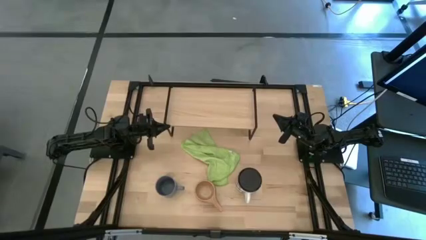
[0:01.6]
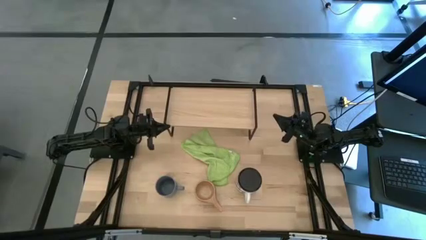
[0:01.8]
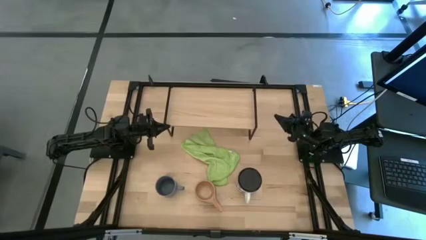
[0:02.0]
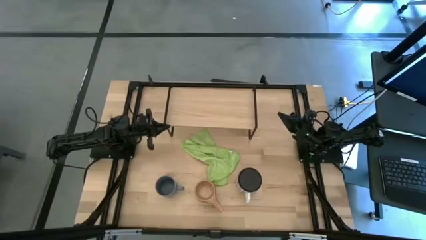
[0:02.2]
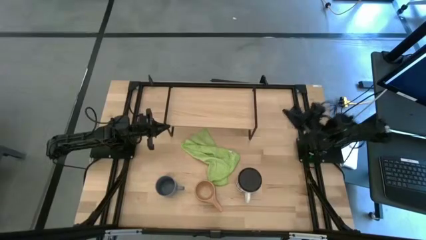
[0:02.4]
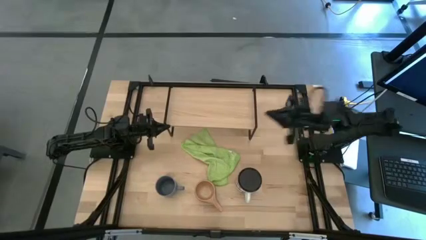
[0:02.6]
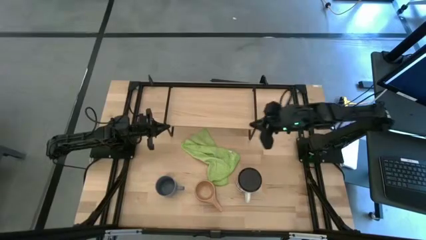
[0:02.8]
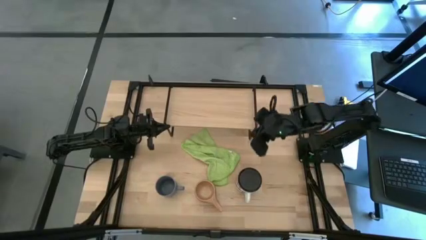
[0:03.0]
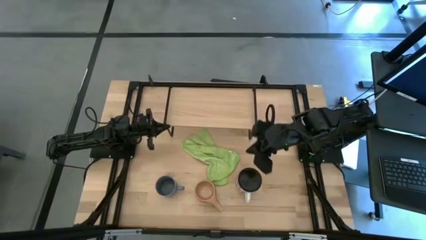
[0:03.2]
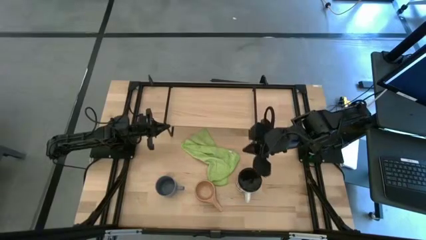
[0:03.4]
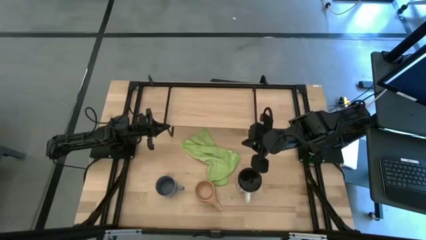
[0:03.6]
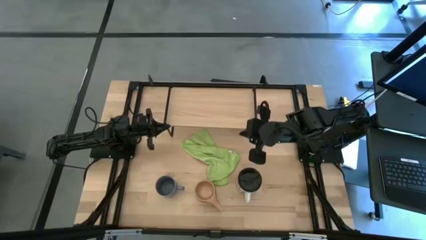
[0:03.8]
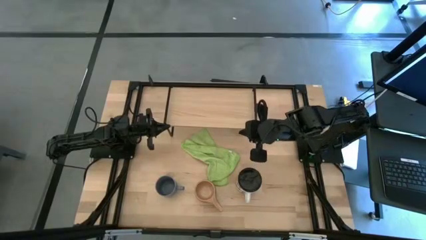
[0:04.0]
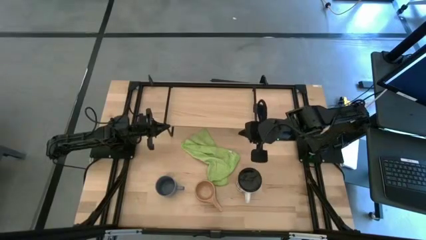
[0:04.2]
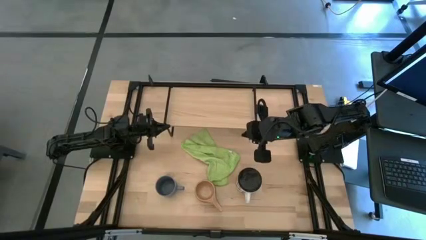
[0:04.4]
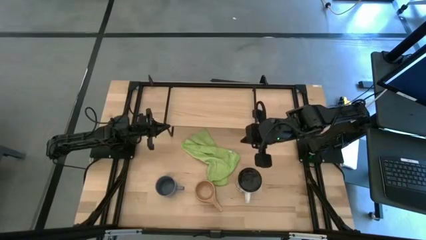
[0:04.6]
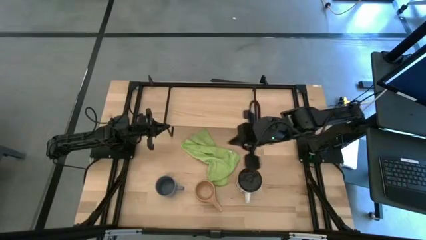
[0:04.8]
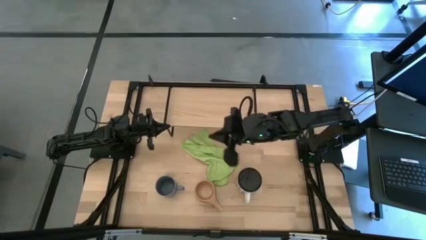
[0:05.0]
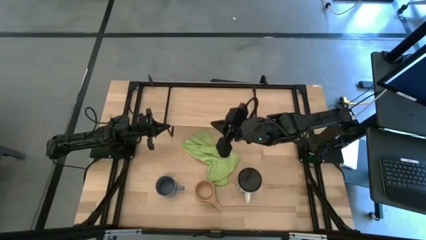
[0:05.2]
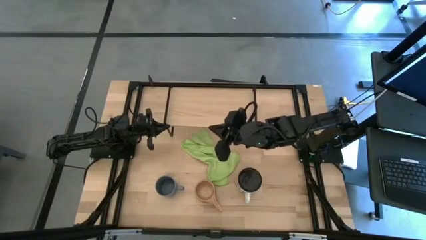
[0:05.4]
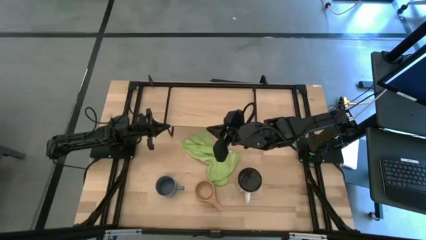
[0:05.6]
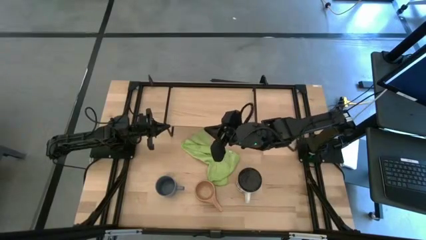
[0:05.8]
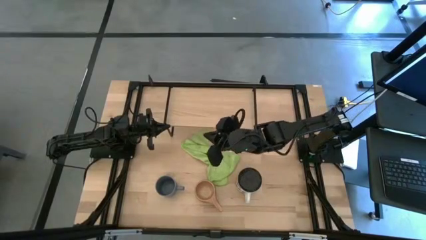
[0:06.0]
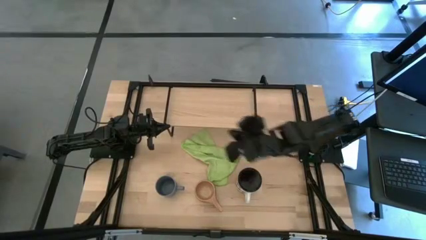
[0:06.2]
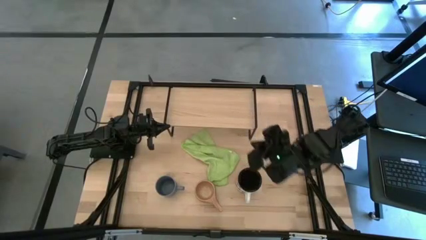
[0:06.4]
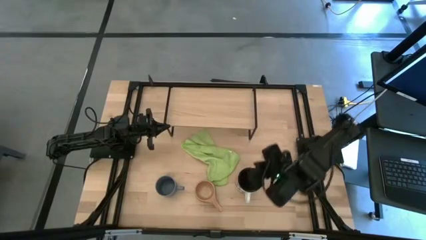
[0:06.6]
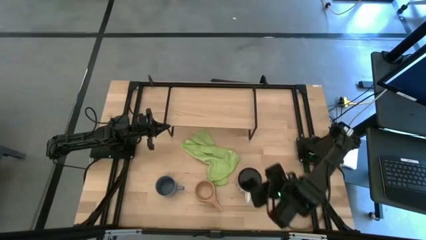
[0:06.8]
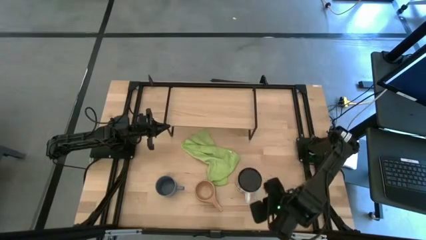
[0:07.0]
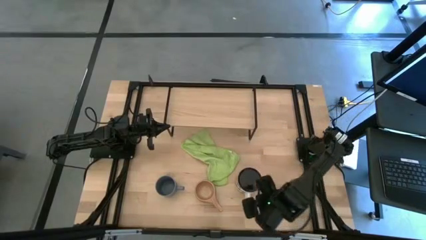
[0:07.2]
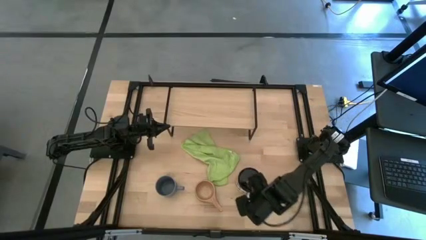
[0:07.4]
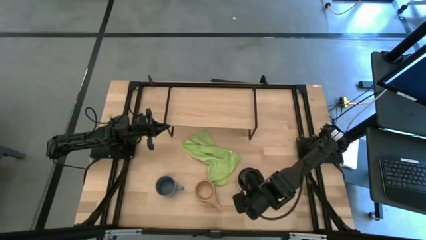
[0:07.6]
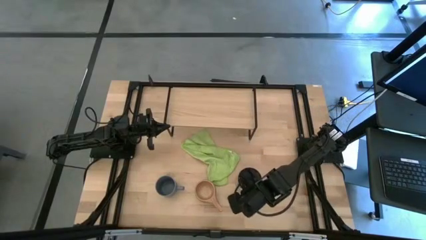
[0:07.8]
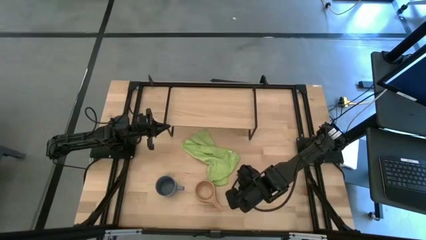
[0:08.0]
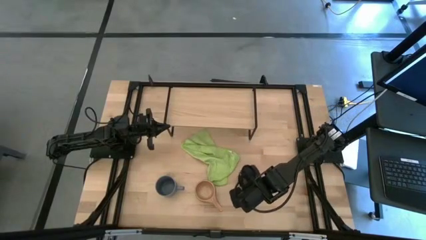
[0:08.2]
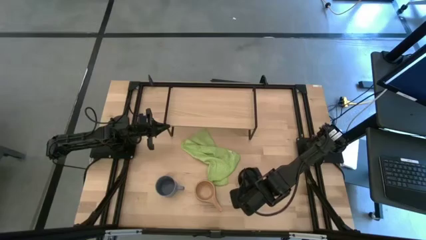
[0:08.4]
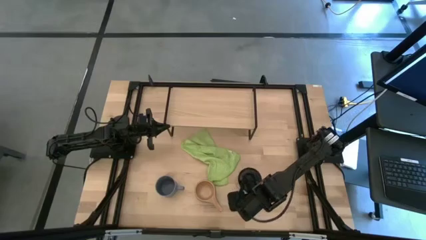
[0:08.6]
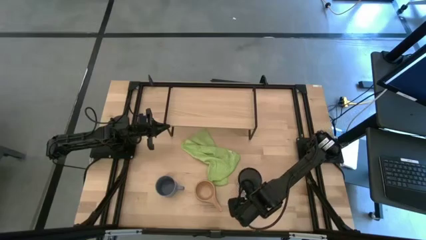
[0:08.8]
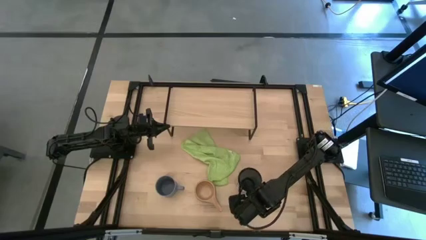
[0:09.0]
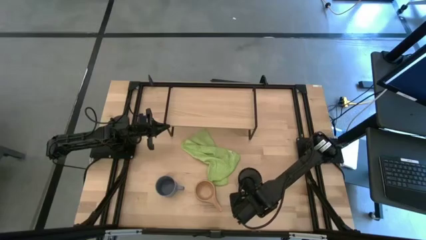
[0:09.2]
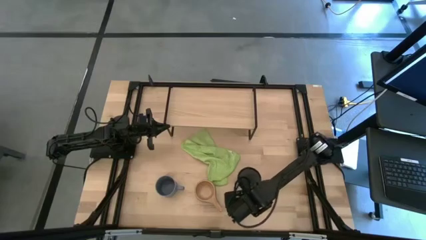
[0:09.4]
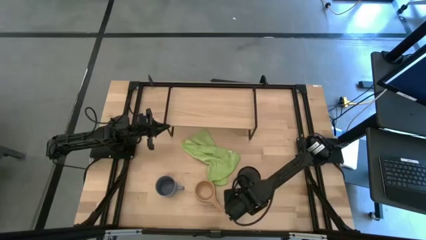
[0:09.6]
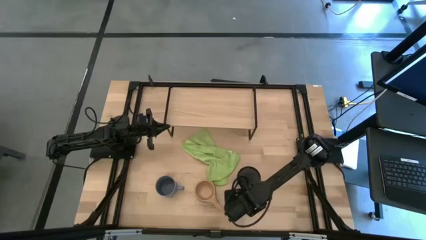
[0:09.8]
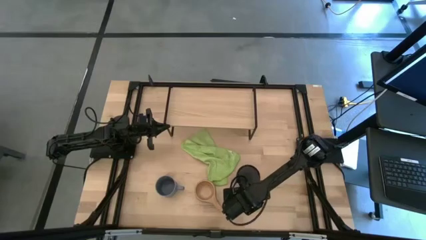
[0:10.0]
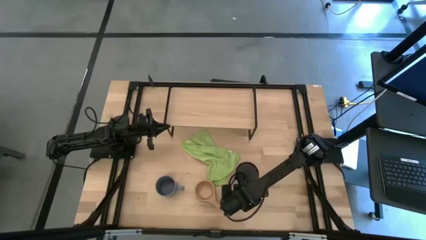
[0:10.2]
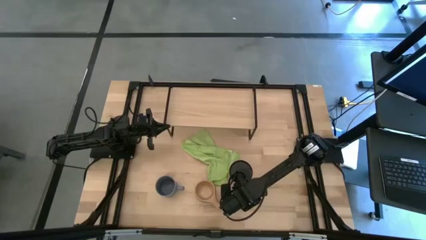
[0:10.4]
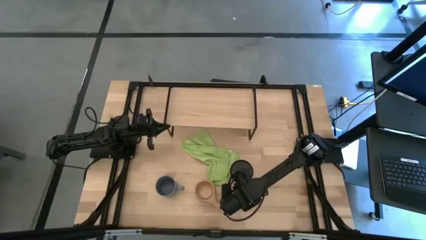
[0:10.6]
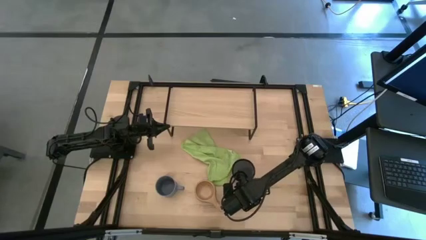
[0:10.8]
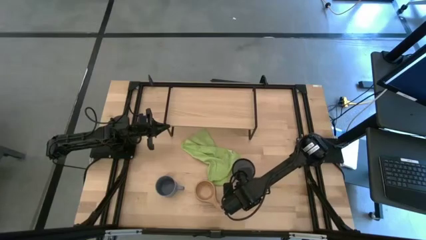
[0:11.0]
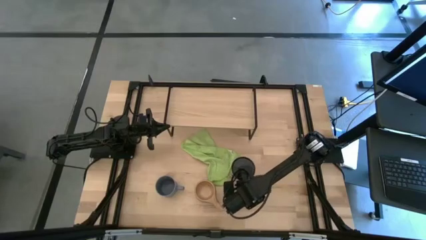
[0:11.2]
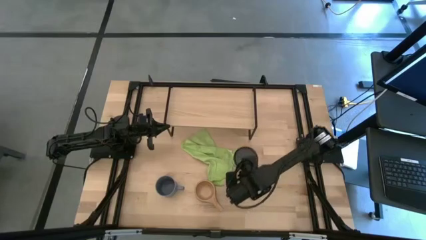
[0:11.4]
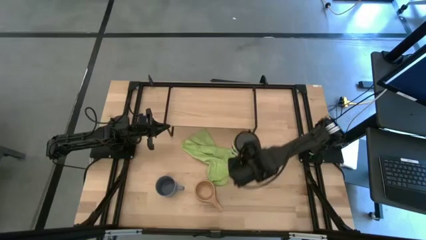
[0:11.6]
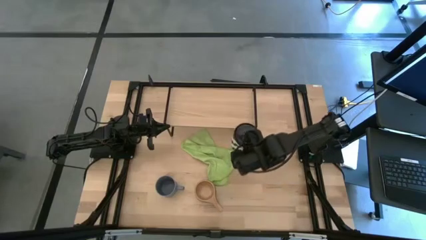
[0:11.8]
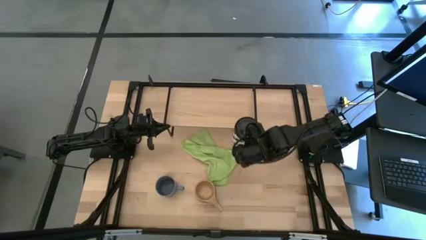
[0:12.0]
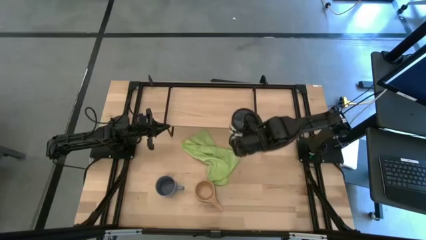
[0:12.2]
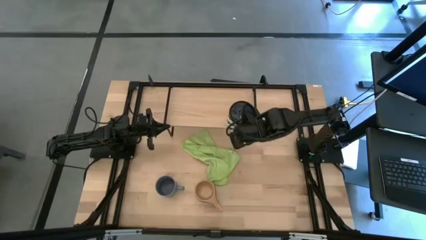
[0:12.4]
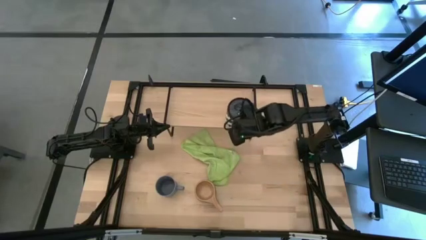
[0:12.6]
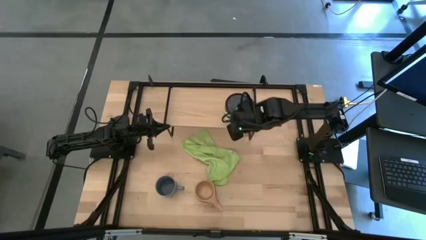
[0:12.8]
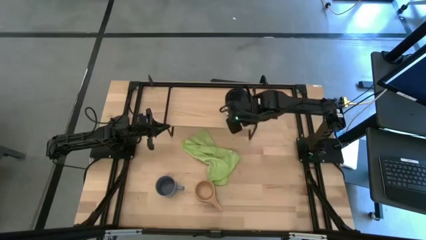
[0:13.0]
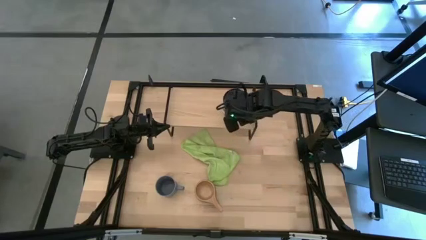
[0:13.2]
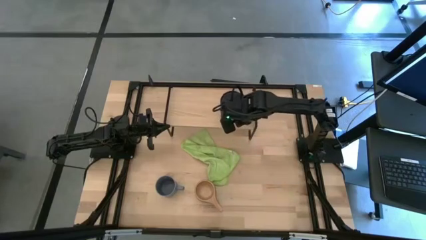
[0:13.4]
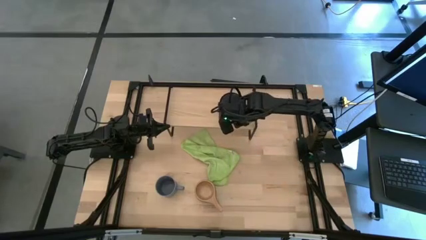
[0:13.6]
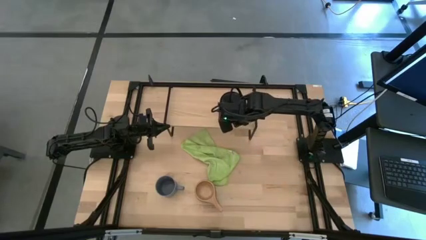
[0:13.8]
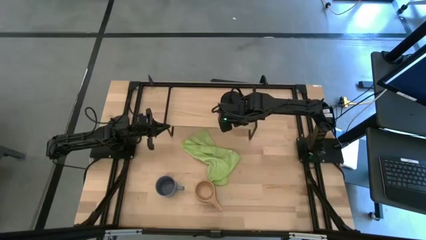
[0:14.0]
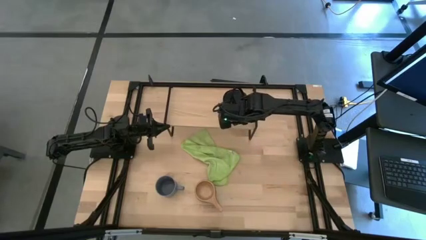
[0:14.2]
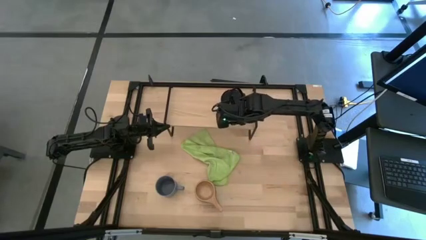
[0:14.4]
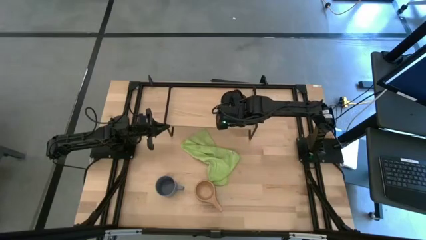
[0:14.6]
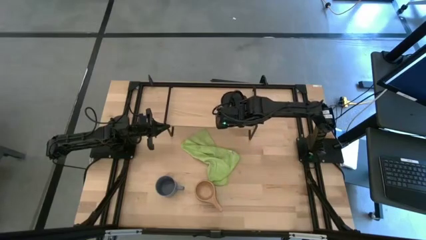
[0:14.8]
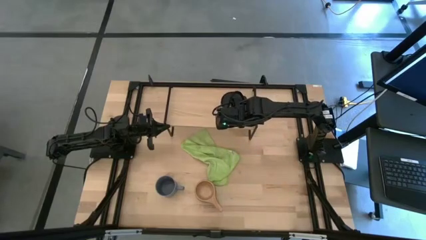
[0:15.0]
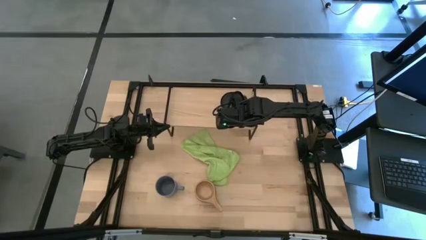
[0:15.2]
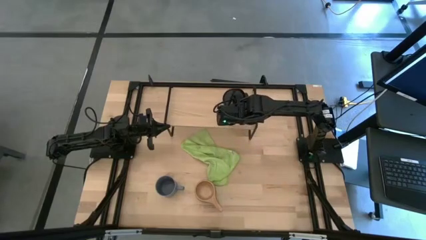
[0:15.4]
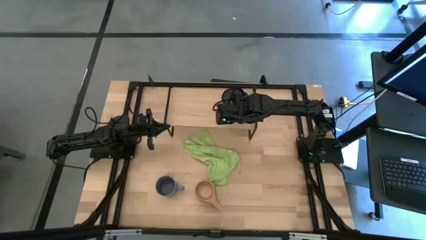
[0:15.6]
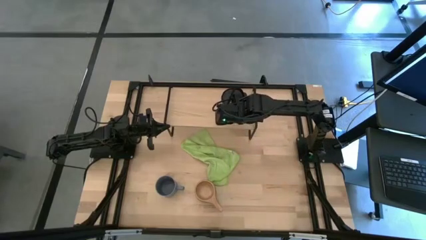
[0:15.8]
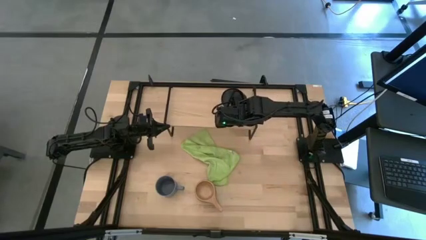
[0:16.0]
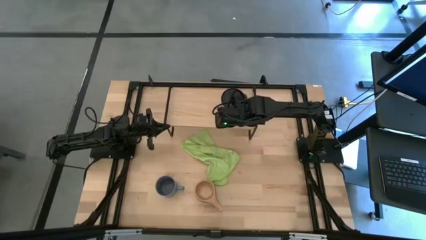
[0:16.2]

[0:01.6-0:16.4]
Task: Stack small to large cups/mugs on shelf
Put the black mug on the shelf
